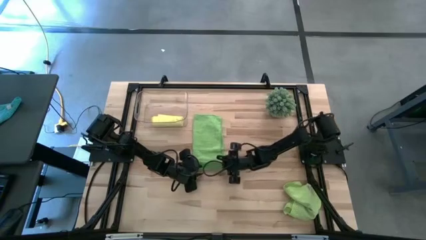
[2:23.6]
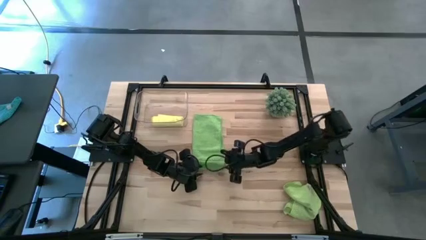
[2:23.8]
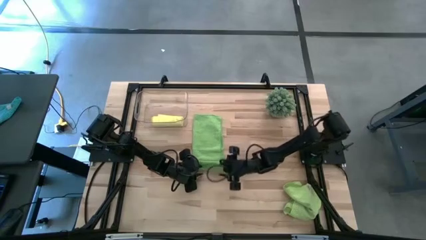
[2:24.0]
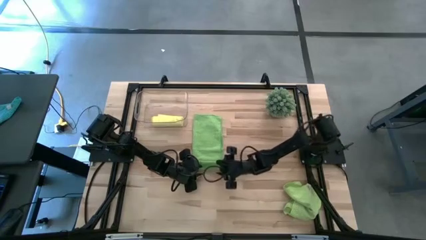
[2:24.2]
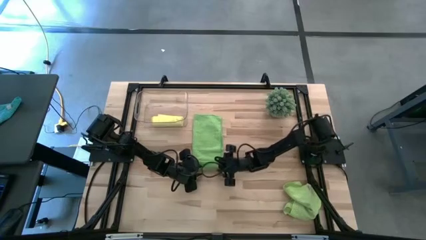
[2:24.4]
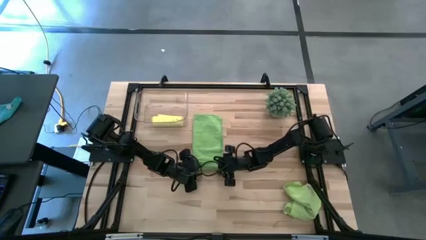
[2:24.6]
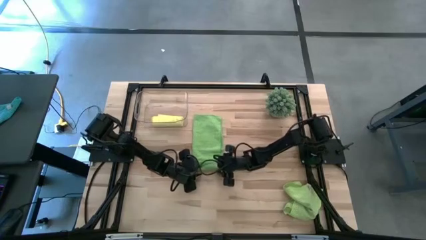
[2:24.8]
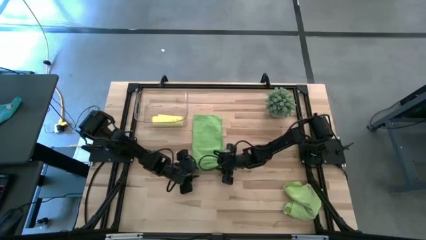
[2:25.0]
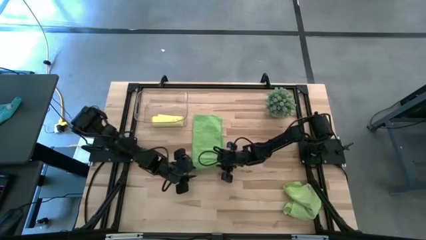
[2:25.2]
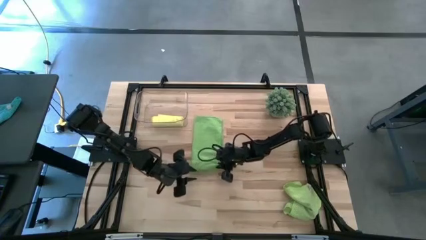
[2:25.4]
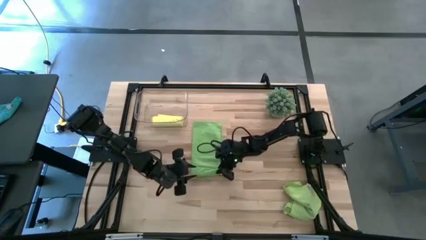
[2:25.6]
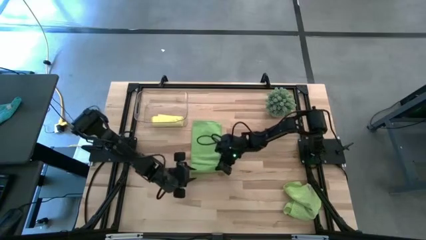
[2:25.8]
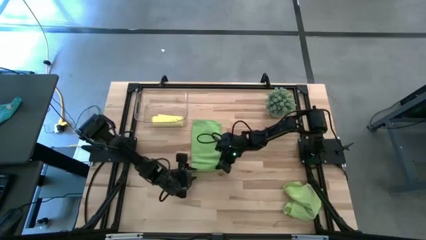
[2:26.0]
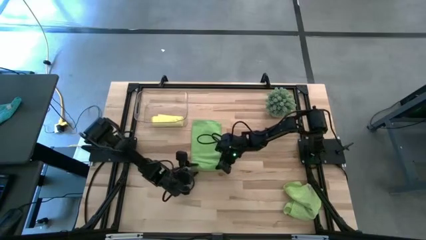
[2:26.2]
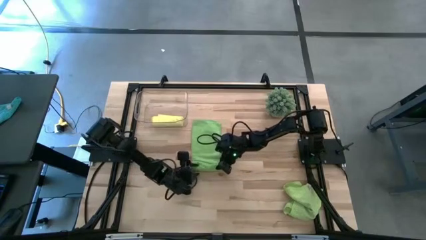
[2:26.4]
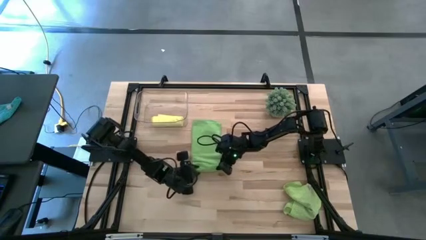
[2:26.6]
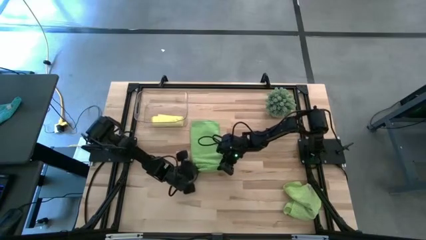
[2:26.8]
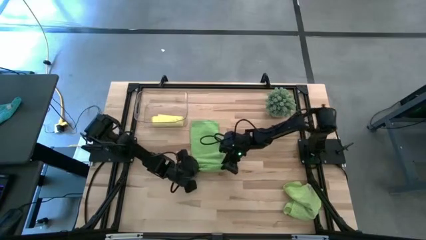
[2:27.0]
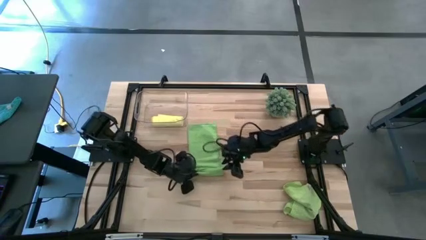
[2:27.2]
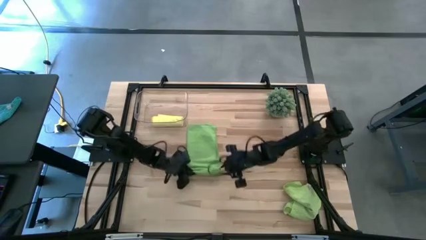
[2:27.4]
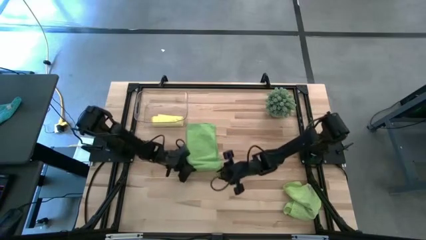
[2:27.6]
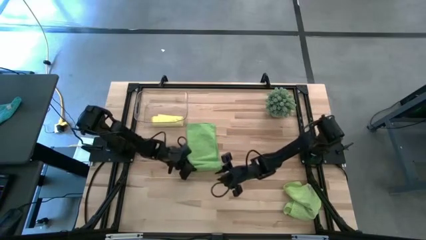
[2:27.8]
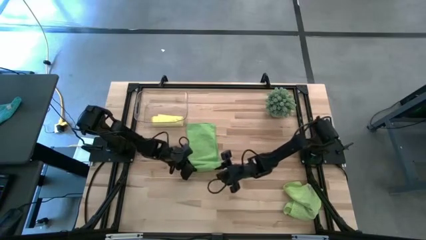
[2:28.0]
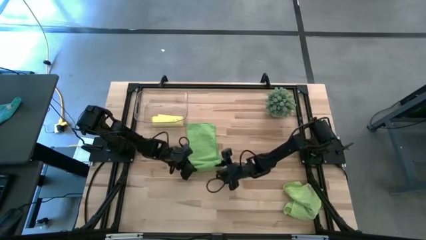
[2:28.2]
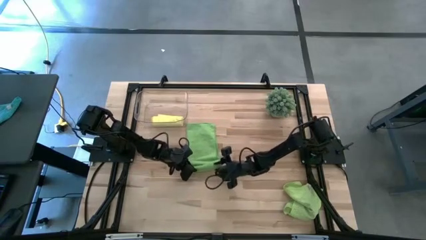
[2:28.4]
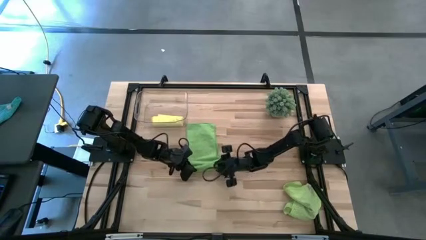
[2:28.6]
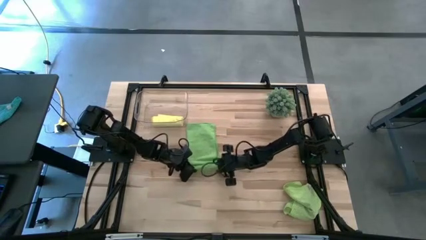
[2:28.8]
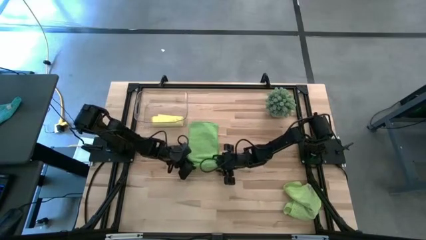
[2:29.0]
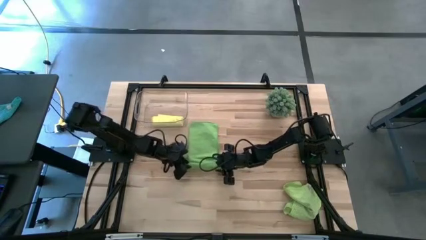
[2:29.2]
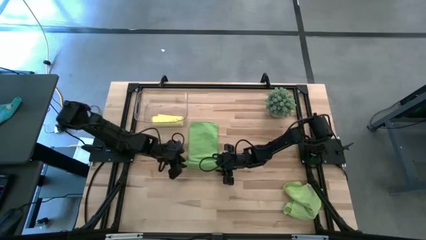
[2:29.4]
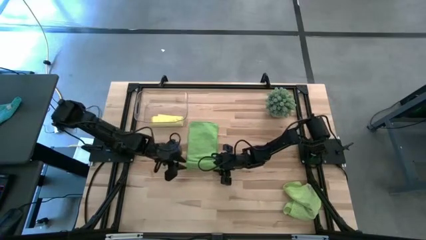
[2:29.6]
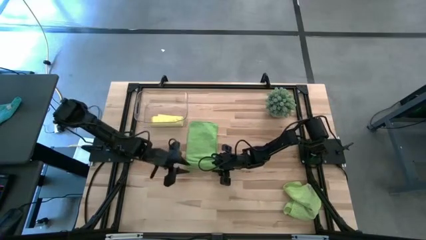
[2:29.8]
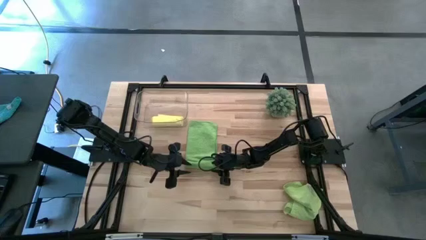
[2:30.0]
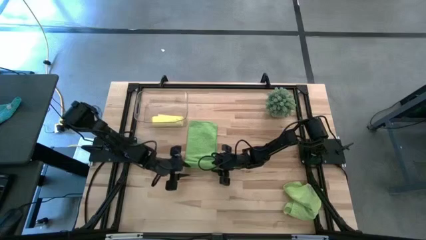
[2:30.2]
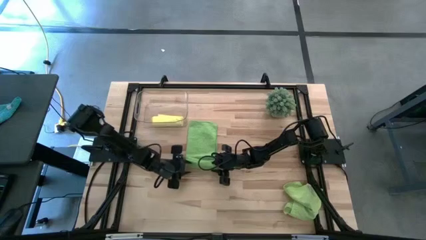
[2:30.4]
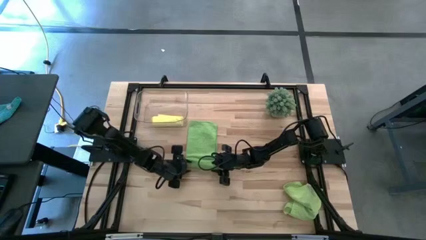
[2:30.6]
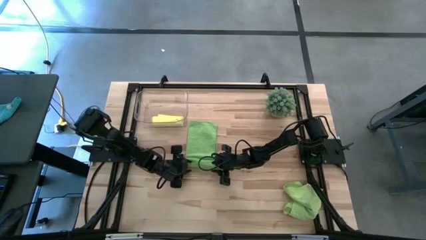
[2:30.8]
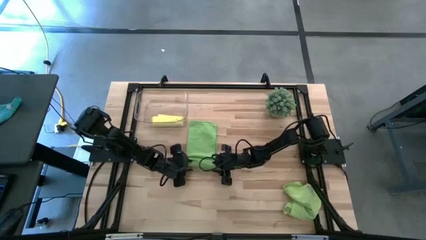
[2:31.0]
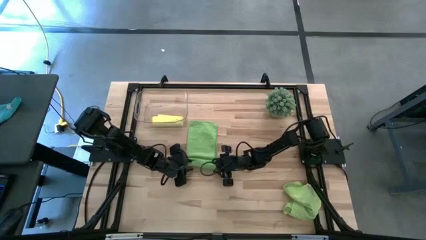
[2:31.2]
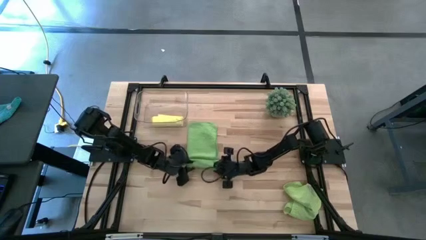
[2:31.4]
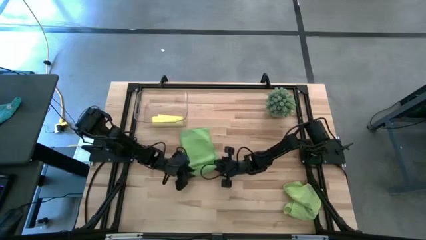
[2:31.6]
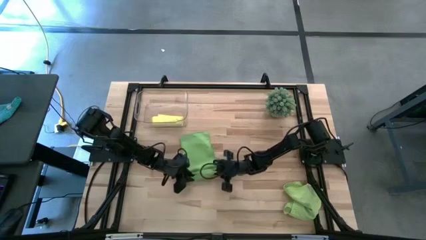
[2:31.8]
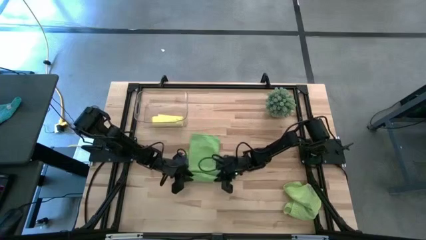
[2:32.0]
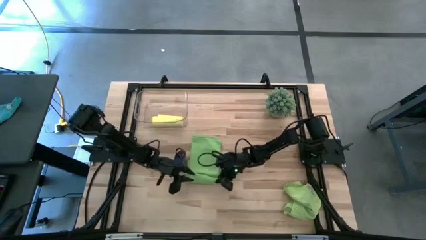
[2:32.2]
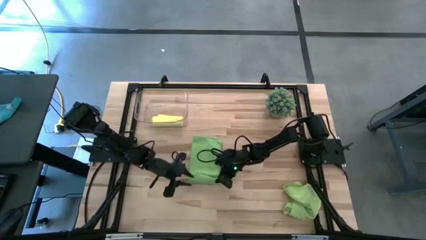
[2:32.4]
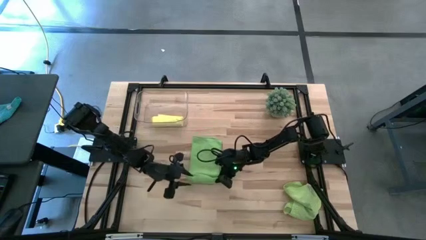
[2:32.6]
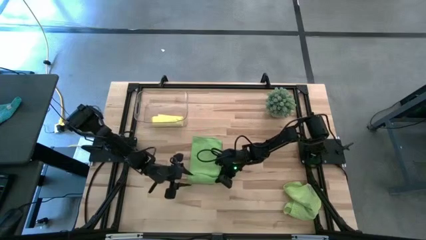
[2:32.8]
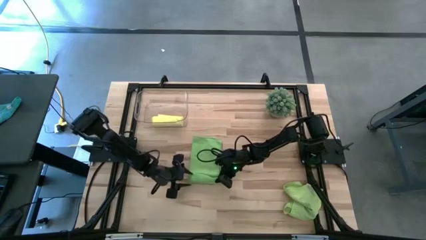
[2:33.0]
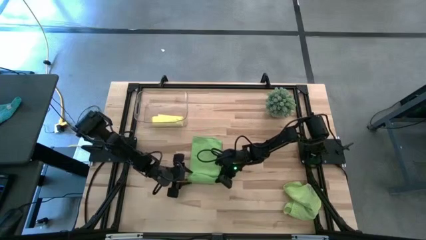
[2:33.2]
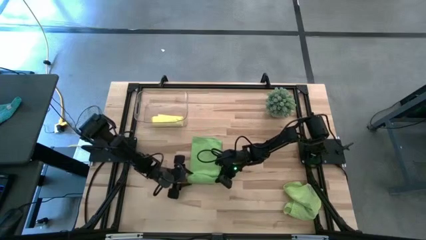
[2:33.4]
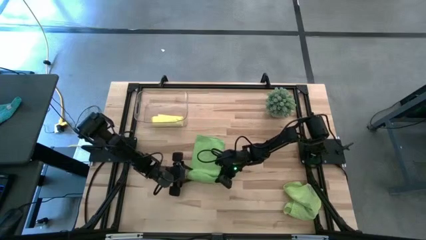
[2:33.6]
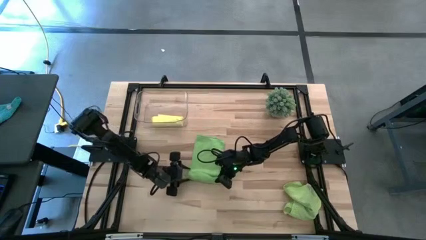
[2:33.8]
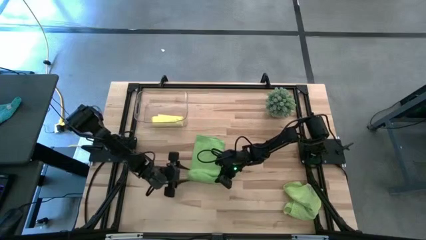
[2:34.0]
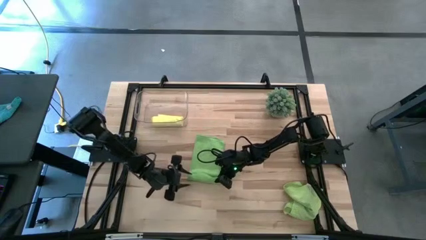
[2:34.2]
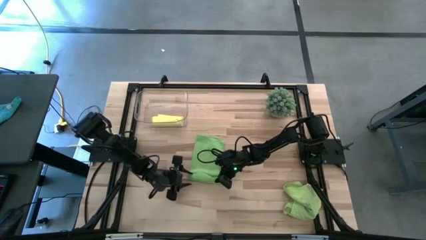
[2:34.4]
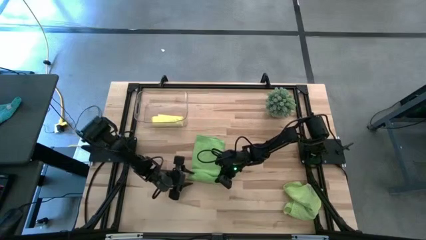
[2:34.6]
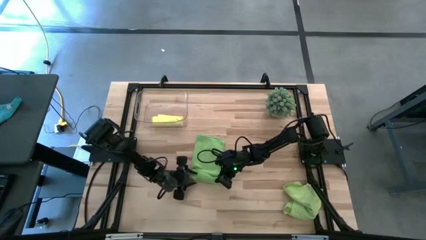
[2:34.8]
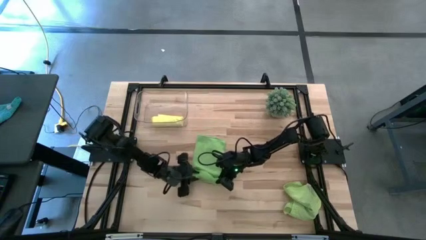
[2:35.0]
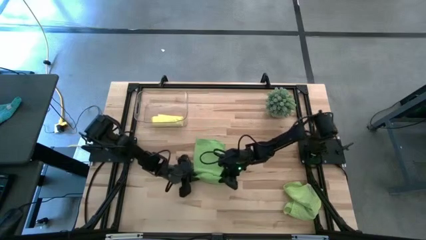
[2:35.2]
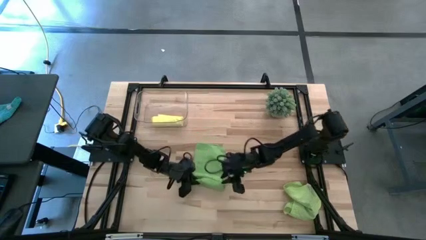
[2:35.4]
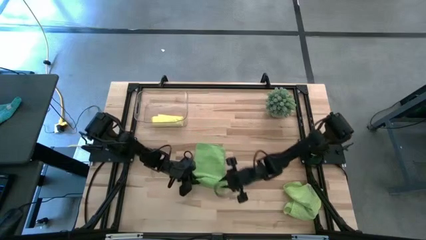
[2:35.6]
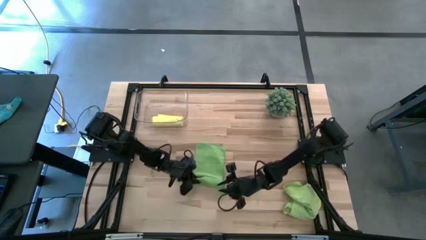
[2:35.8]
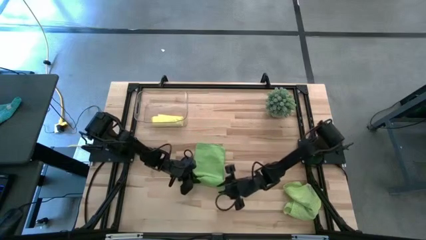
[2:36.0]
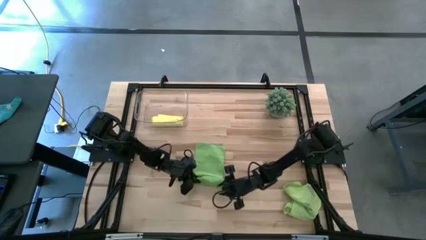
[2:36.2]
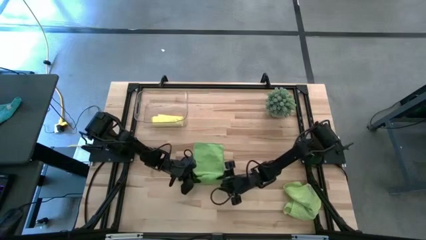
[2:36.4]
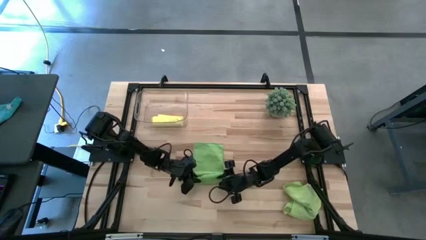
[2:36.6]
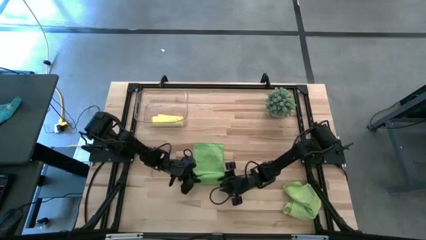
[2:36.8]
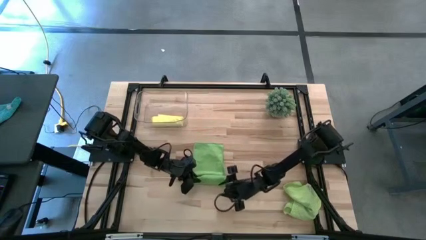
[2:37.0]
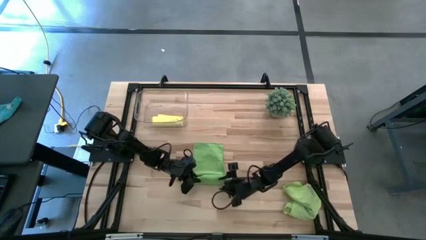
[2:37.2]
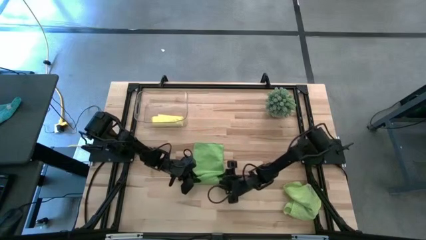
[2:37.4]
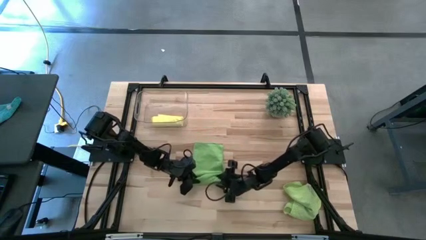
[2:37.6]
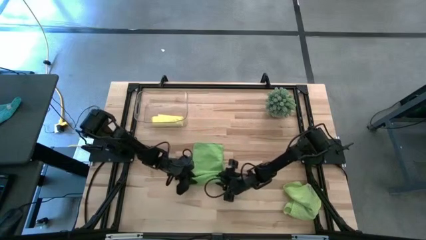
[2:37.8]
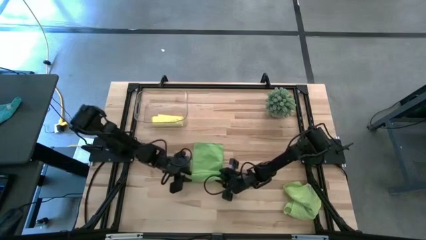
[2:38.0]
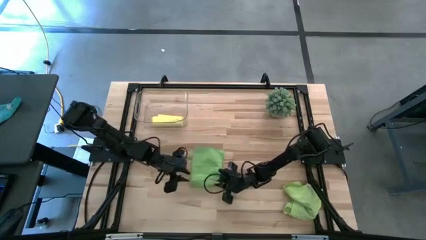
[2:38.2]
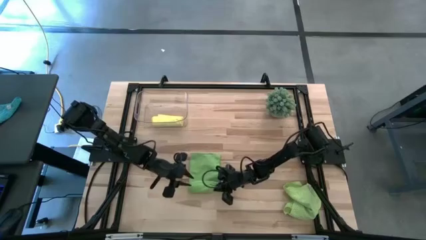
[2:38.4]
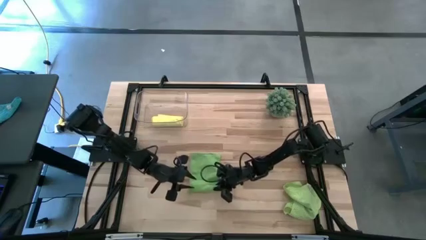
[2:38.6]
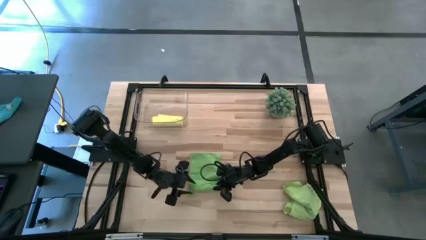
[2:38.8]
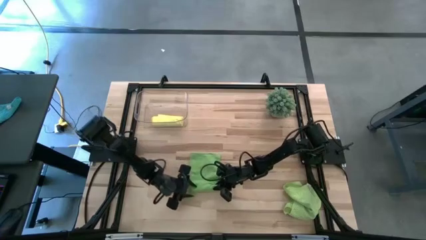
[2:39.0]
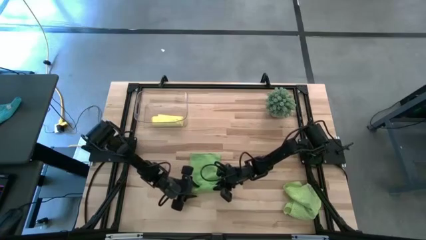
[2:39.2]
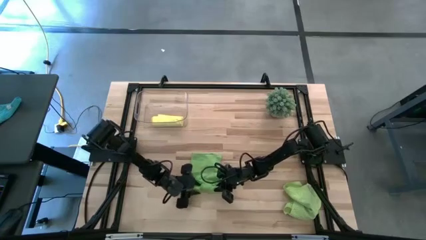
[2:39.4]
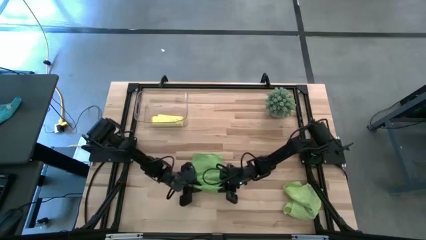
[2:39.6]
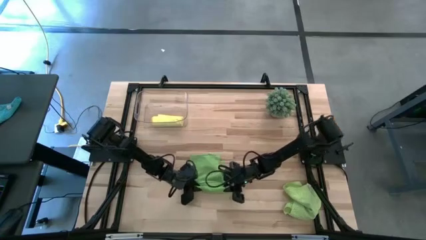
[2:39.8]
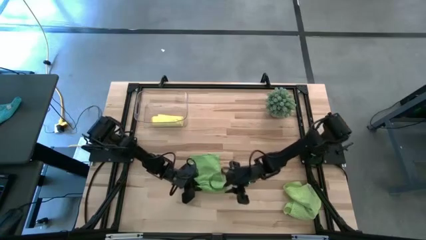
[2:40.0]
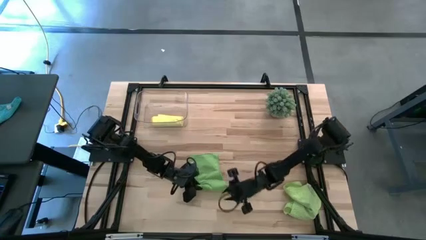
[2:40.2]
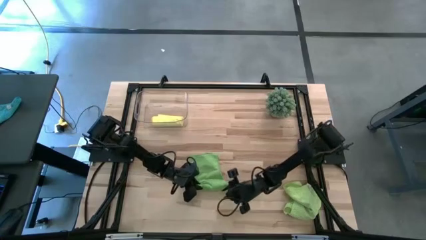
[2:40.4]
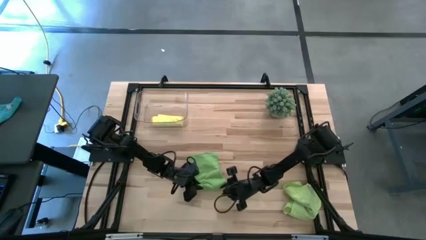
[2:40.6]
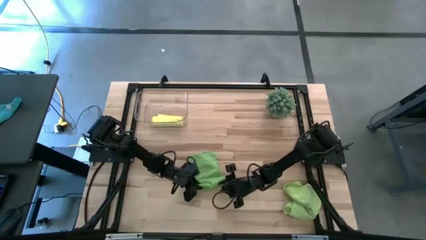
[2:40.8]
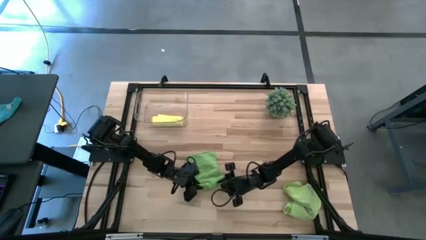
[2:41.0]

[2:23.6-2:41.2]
Task: Roll microfiber towels into tight, uniform cylinder then place into a basket
Roll the green microfiber cloth
